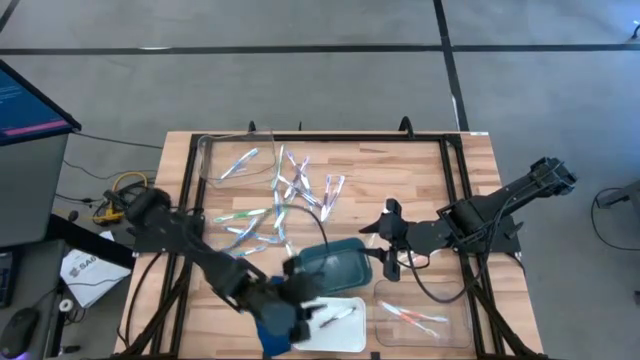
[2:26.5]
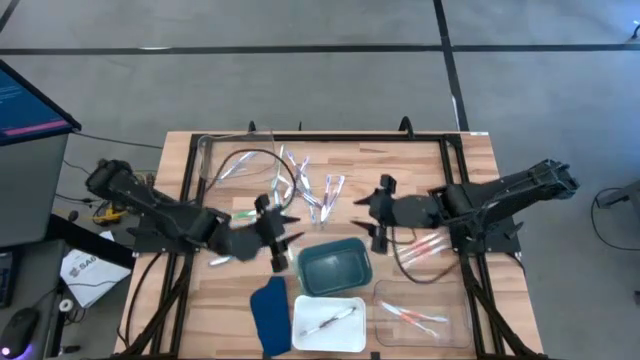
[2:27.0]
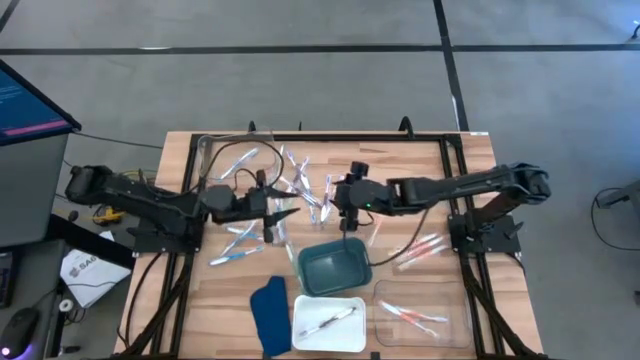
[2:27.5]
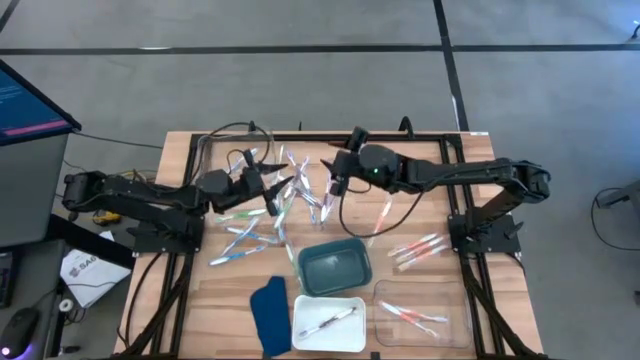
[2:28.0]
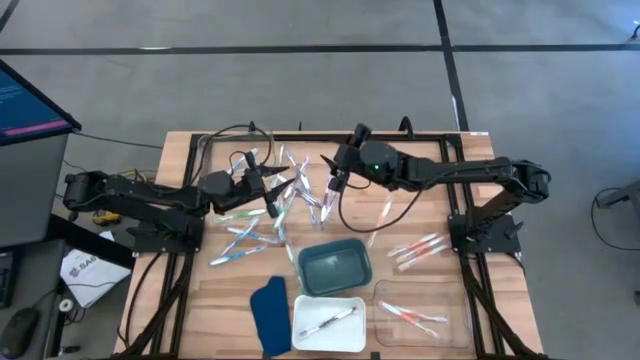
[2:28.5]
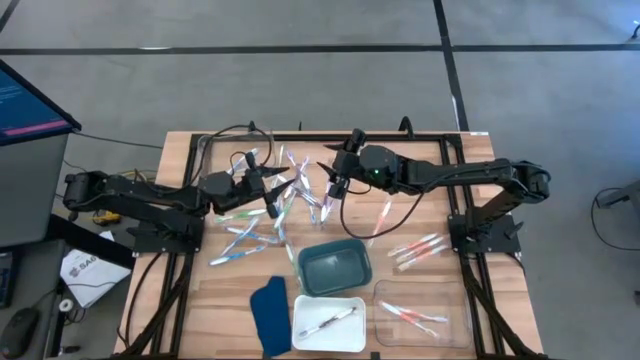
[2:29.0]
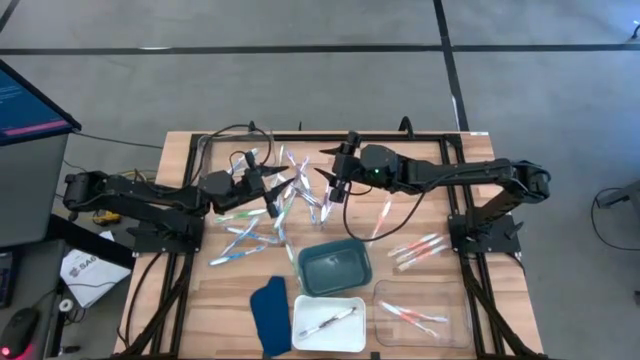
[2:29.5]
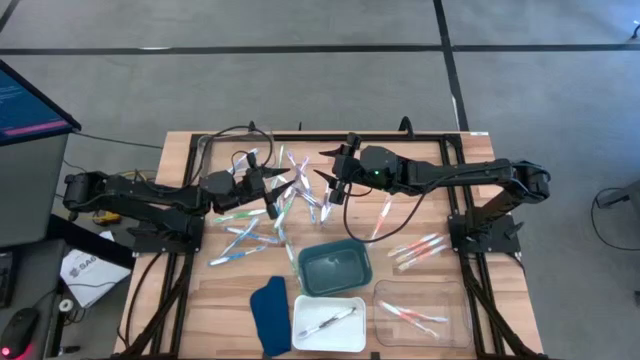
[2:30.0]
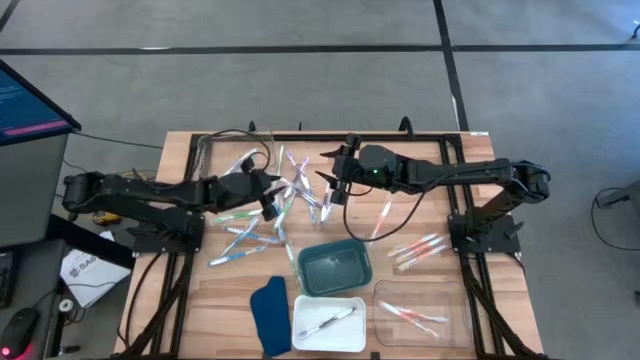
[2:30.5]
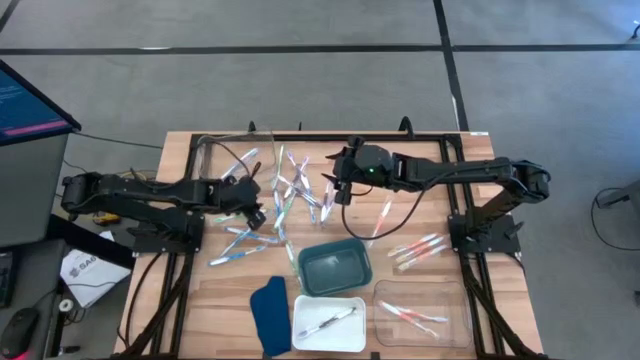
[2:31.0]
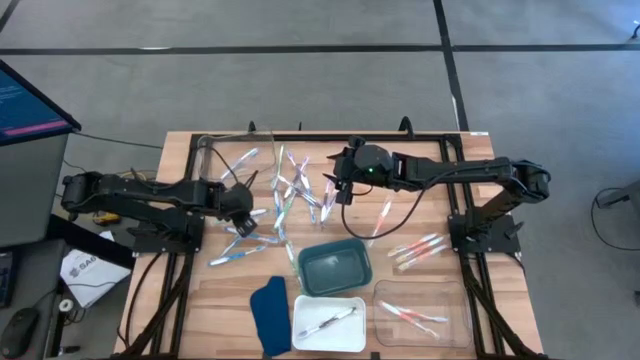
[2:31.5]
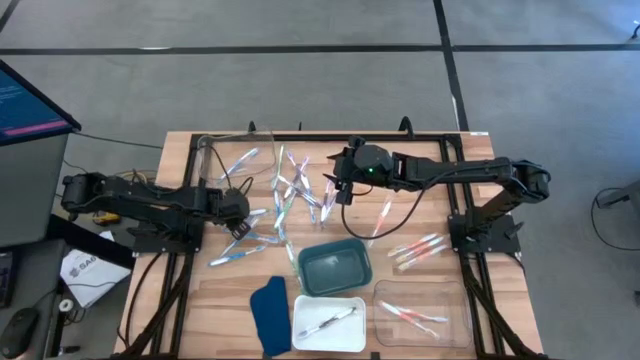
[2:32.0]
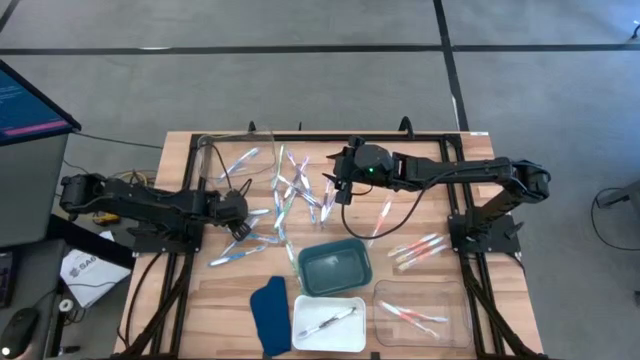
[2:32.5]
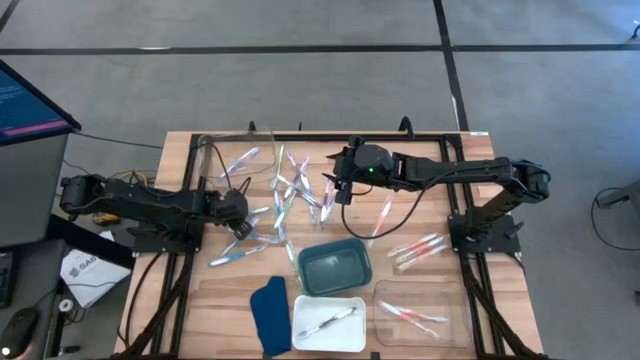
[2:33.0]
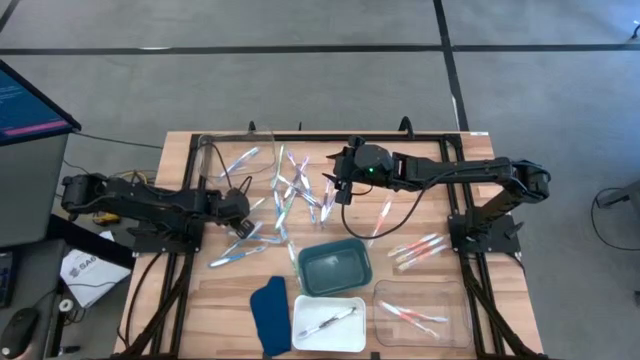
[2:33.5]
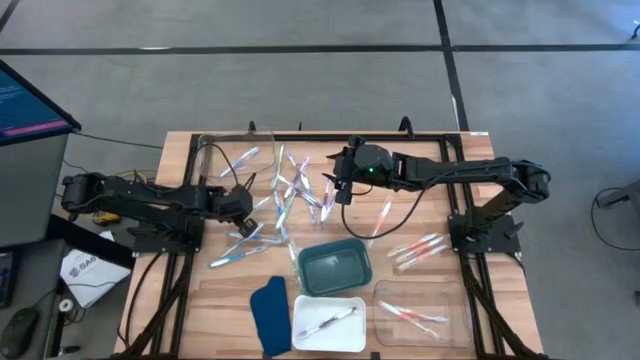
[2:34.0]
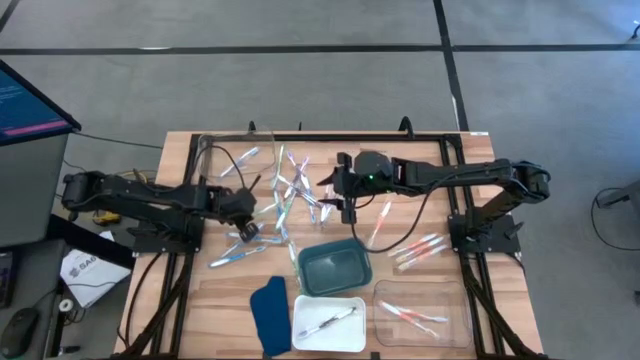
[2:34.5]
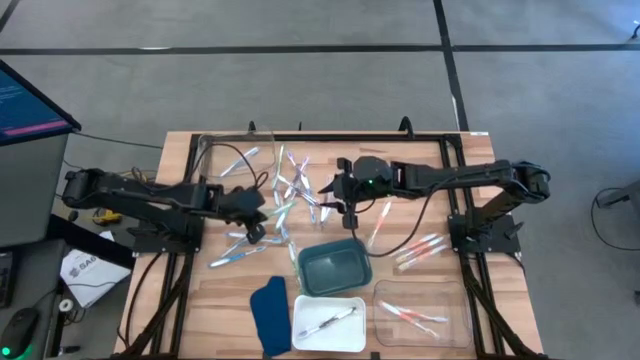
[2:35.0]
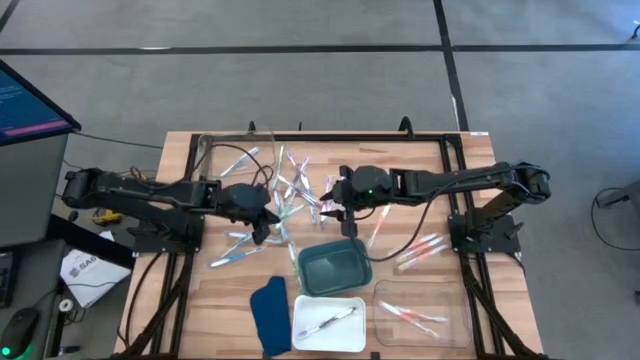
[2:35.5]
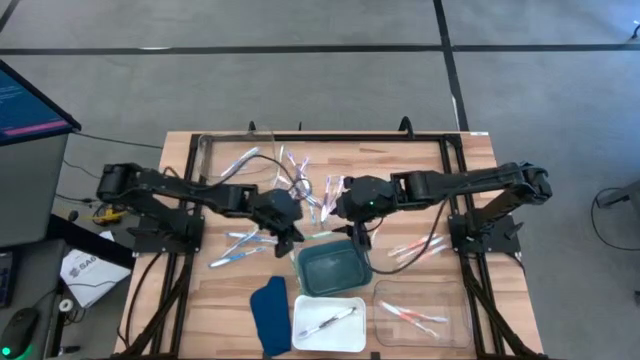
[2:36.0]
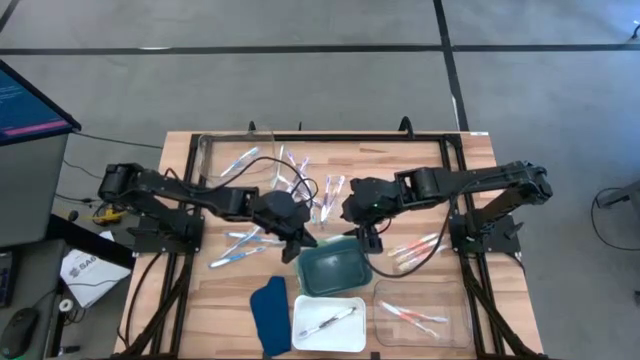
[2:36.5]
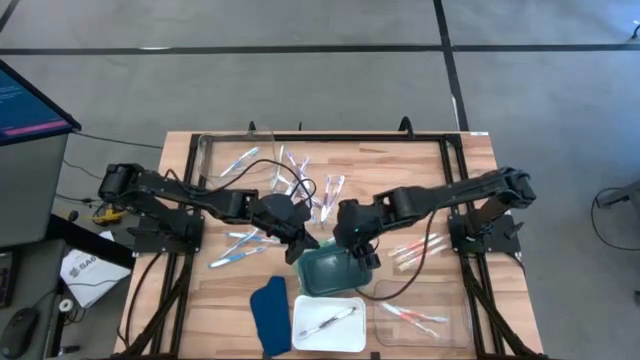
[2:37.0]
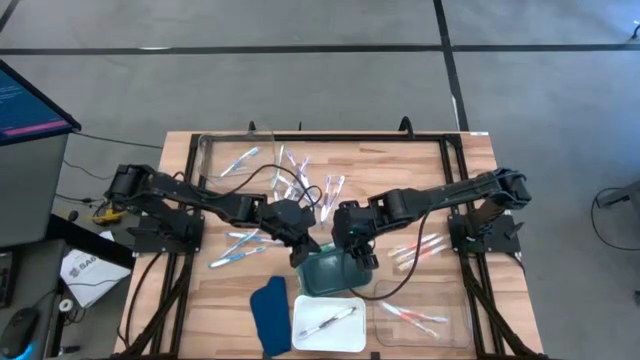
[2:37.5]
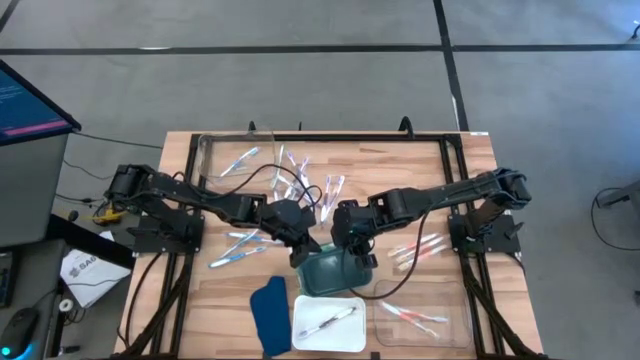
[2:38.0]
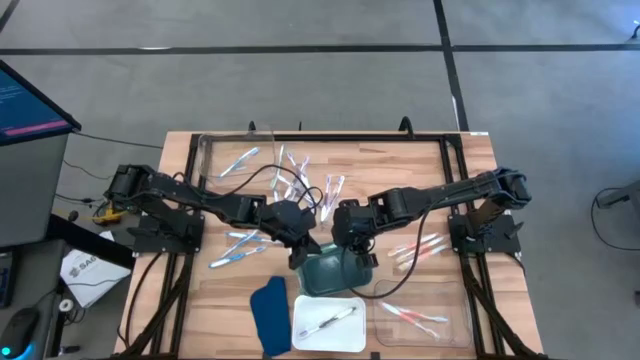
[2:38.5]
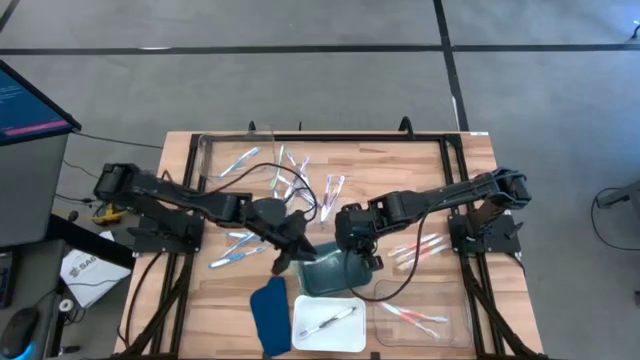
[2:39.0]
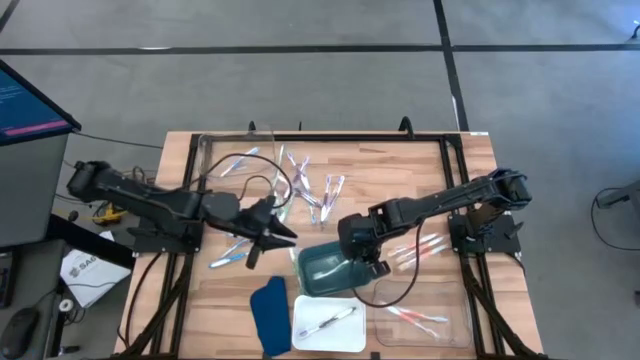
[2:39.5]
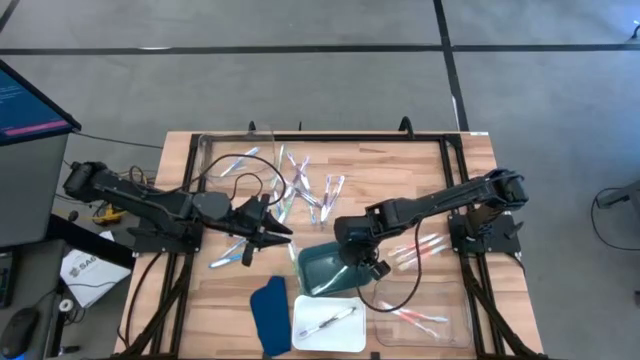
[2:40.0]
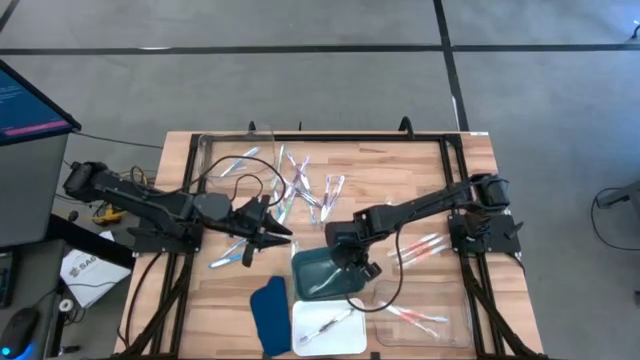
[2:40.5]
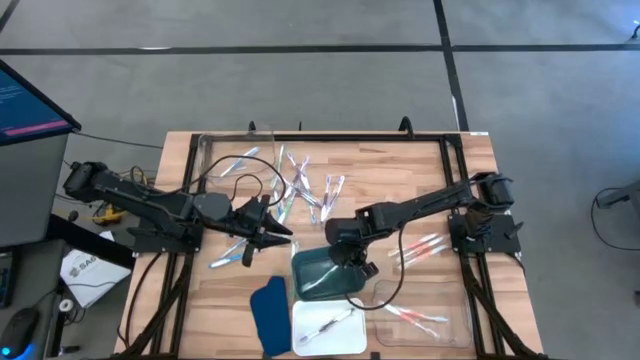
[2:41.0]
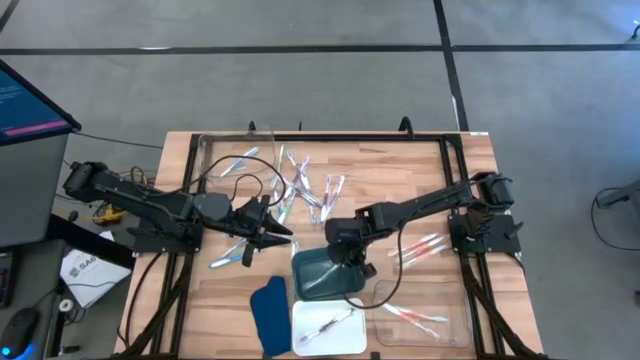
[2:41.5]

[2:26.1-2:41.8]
Task: Pick & Place Toothbrushes
Put the green toothbrush into the green bin

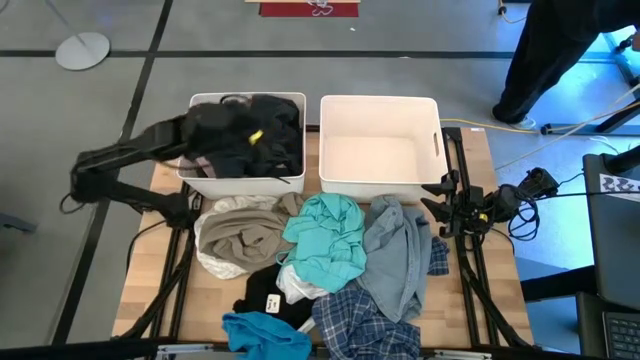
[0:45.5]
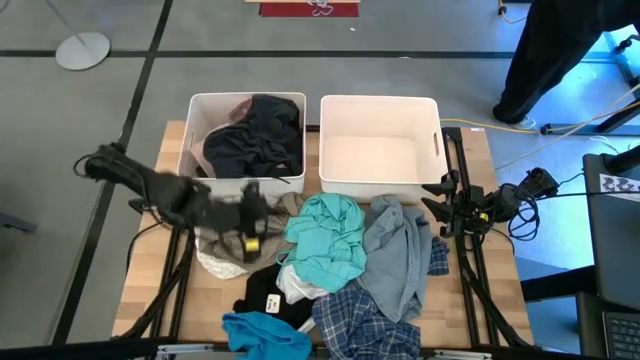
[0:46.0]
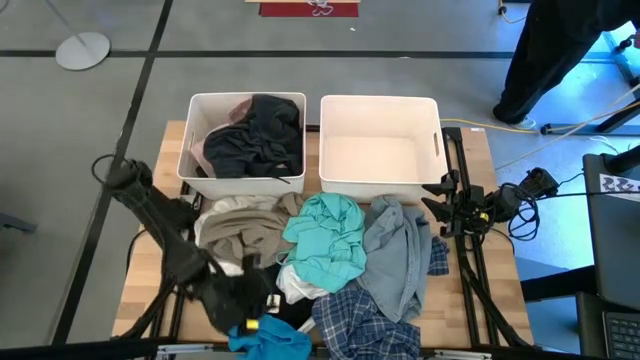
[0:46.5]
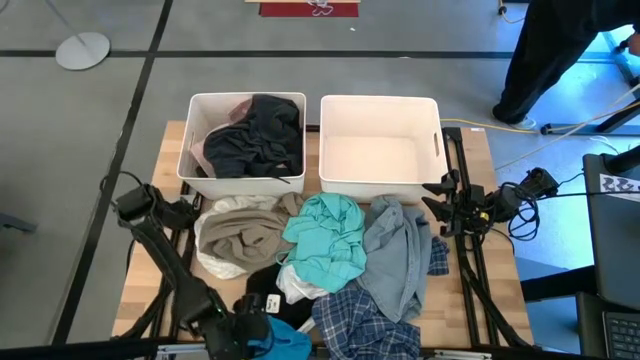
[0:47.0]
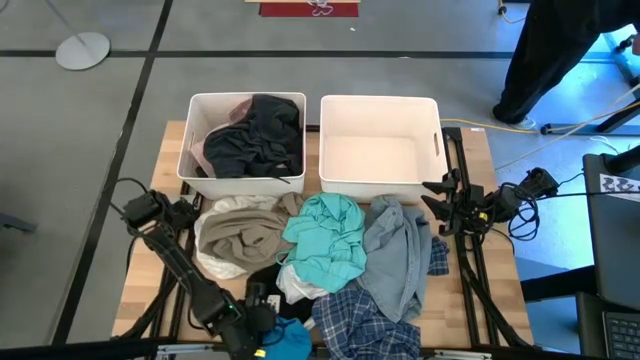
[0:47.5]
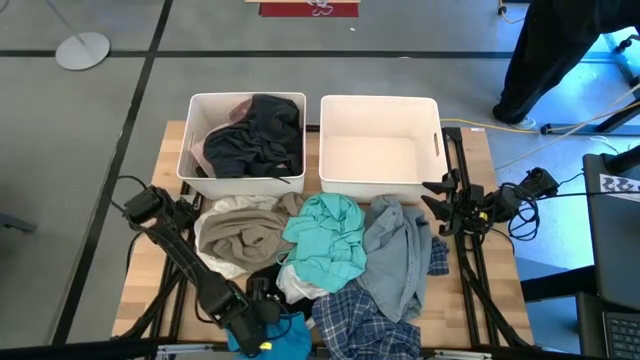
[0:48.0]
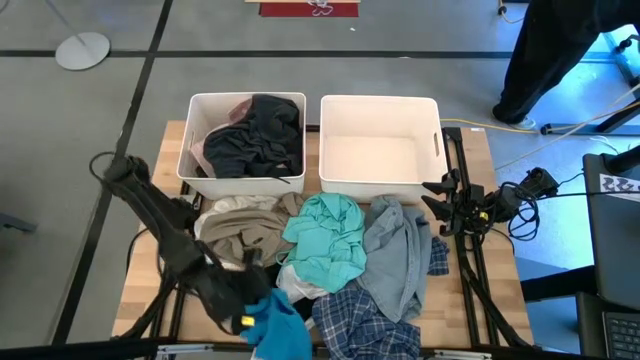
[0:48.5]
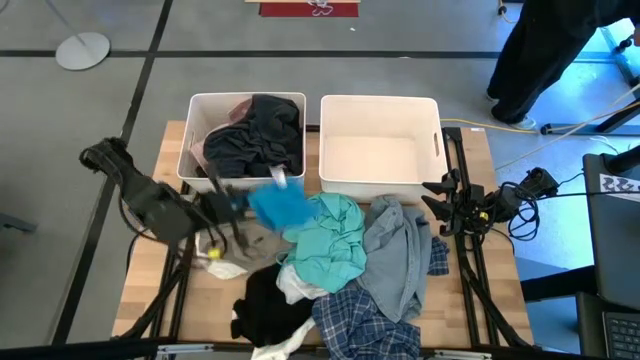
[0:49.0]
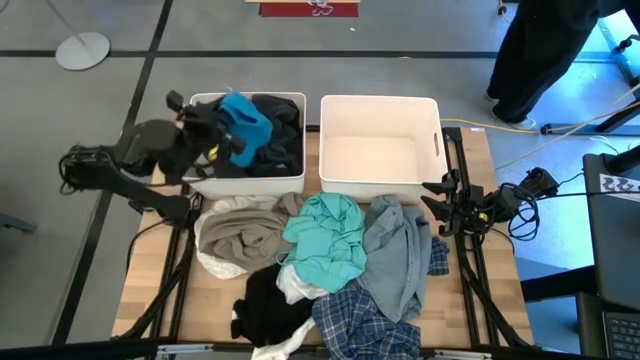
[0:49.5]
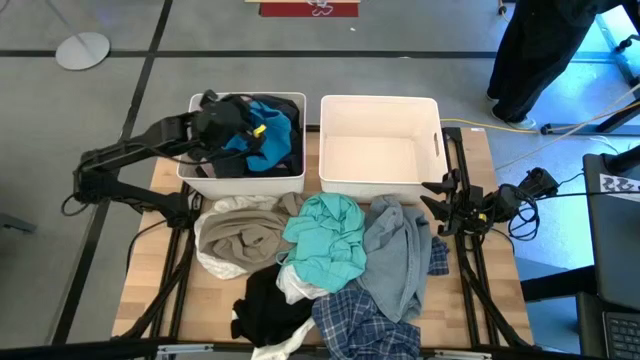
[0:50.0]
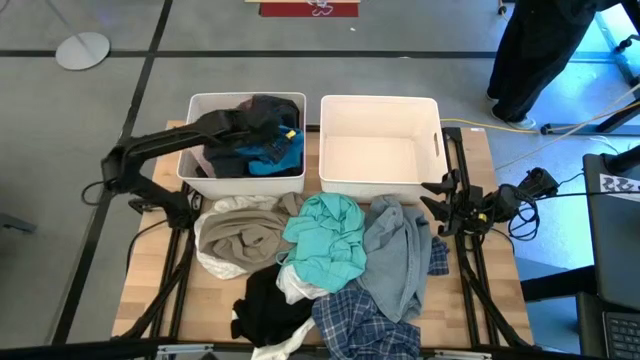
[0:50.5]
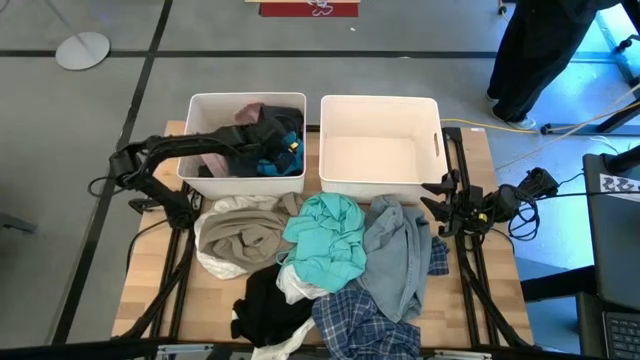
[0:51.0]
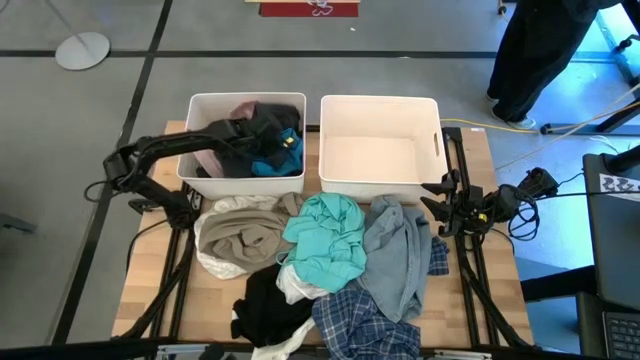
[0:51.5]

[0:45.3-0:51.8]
Task: Sort clothes
Put the blue shorts into the left white bin
